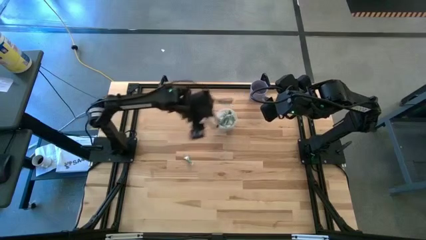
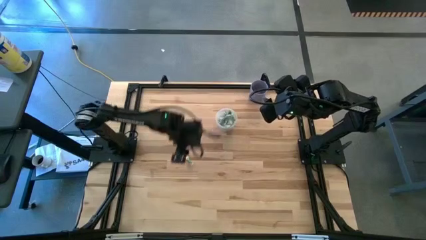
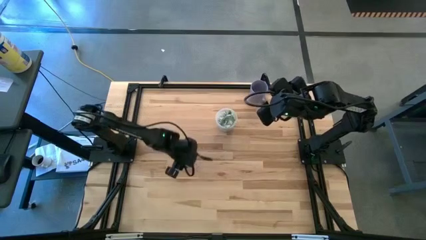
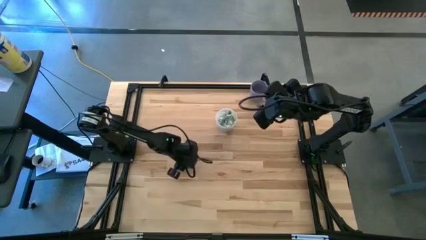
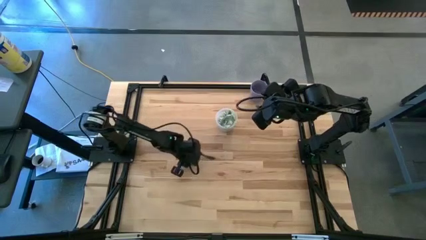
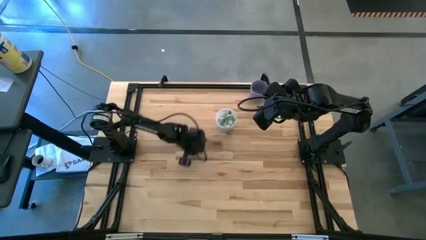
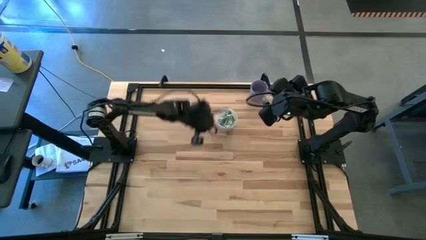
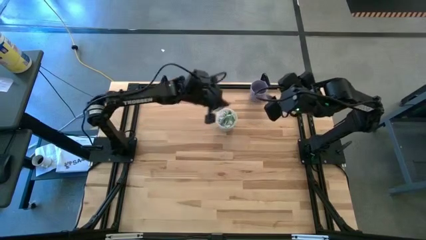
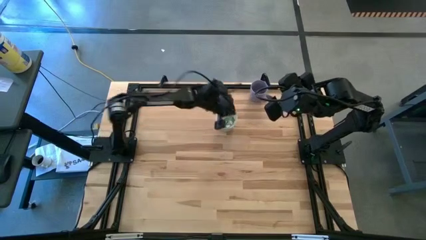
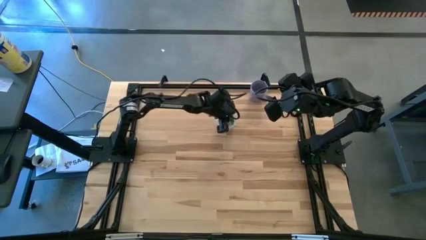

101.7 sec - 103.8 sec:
Task: Pick and place Stevia / Truvia into bins
Put the stevia packet into the transparent container

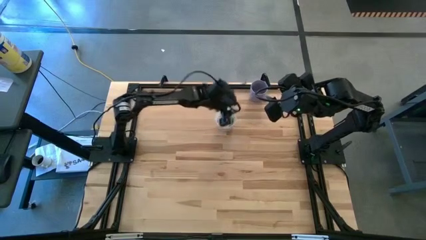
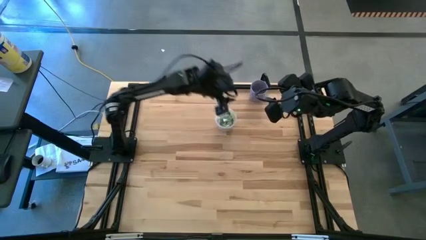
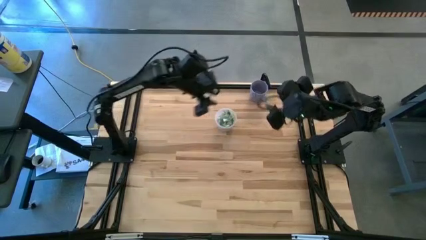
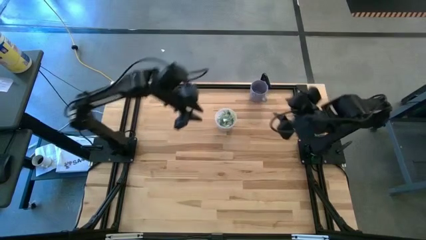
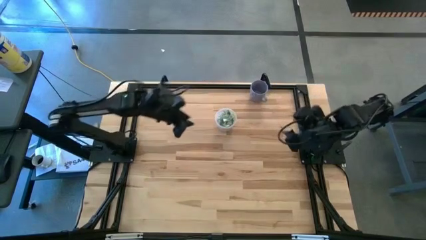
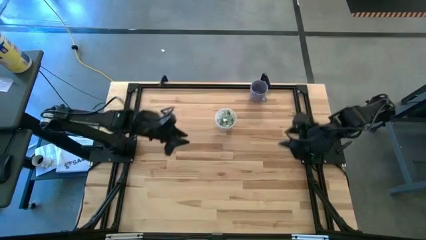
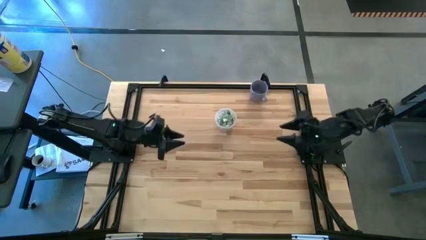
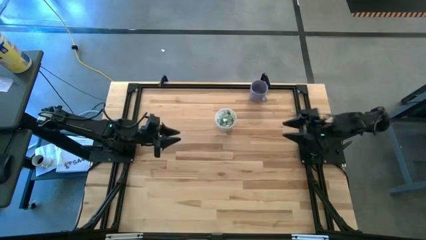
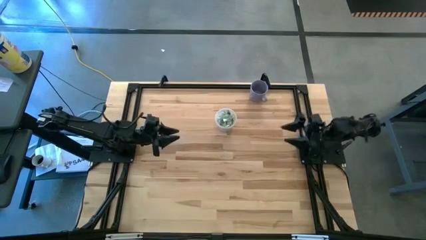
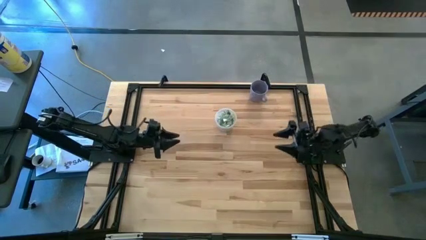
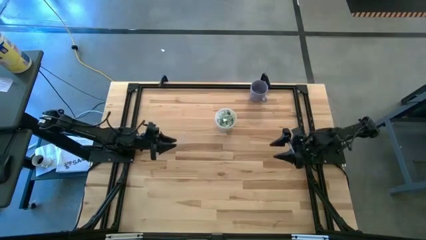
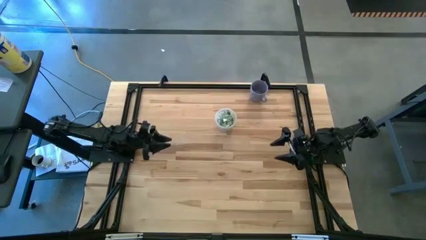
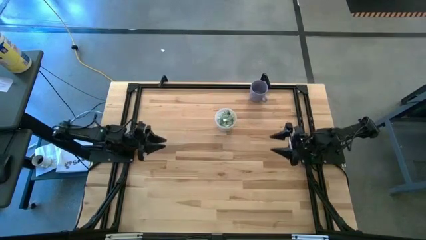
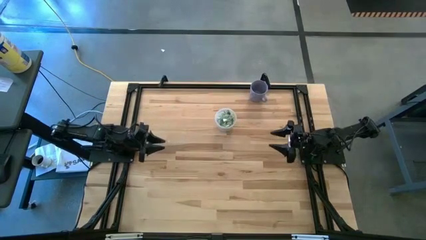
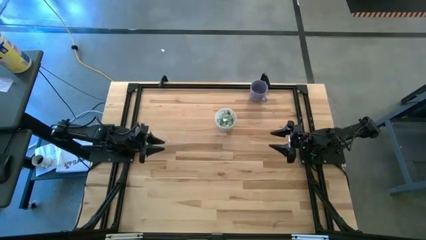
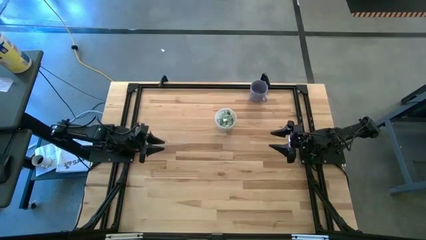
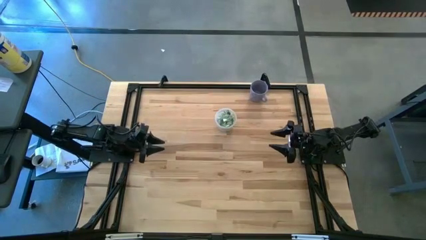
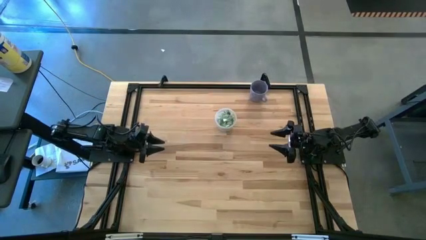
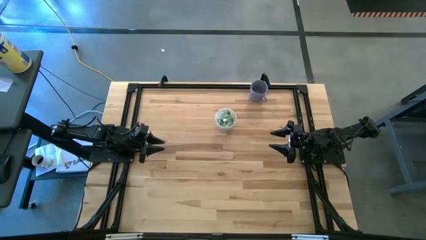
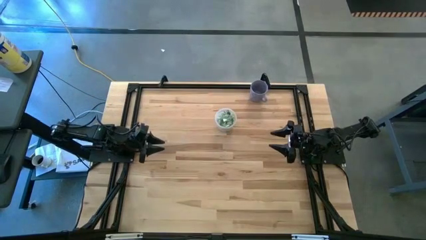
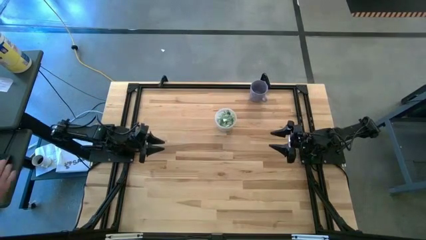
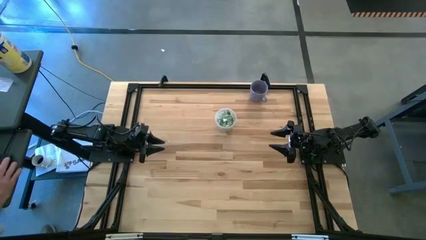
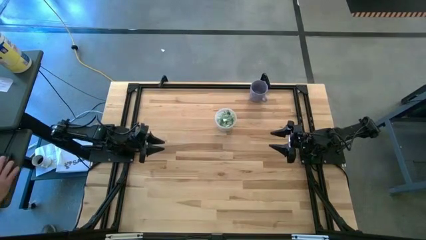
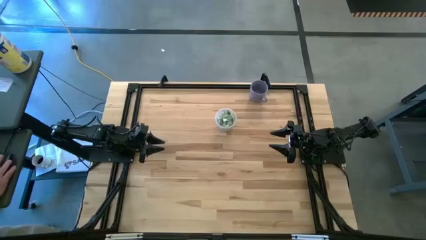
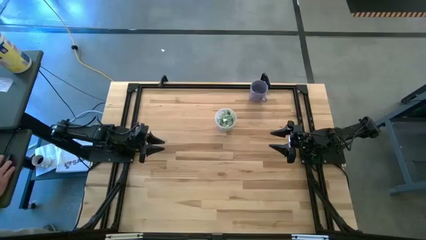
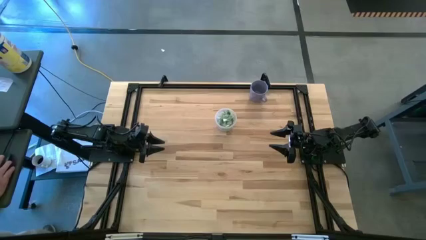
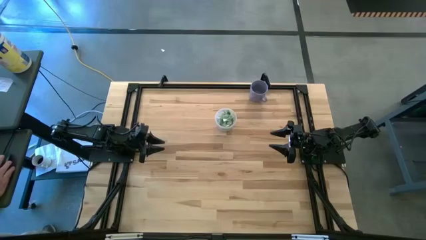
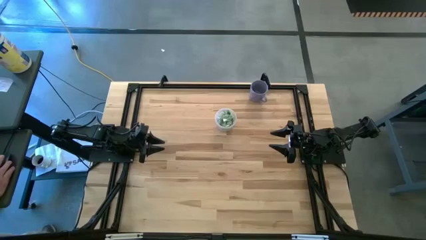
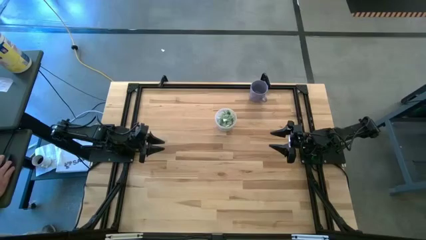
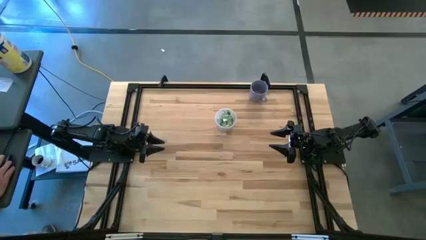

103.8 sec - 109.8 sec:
Return to Home Position

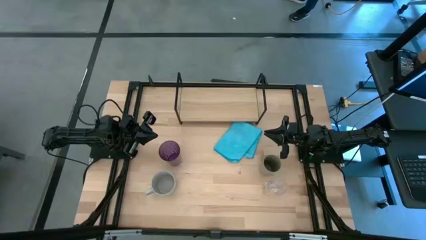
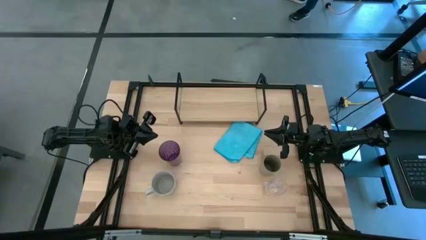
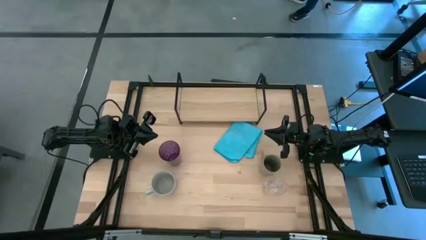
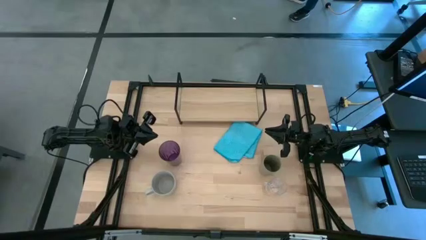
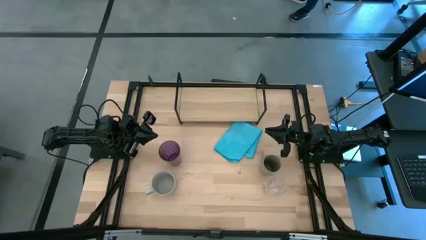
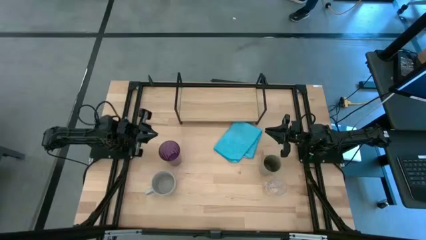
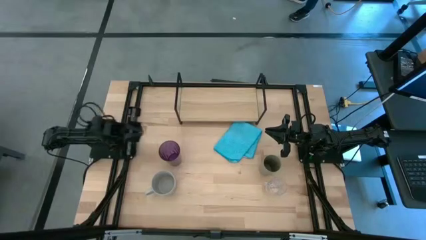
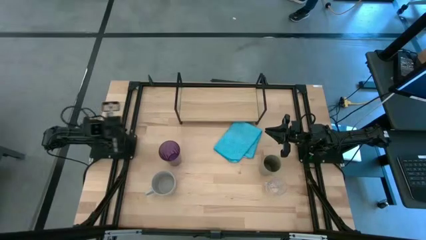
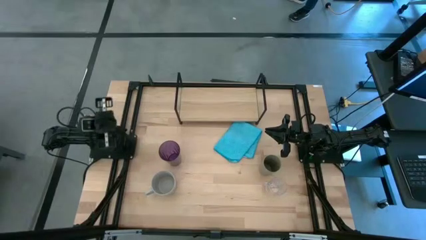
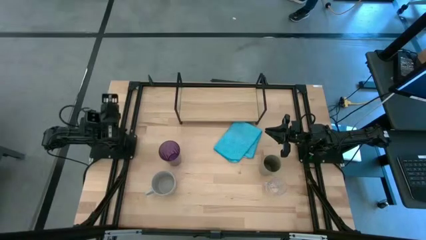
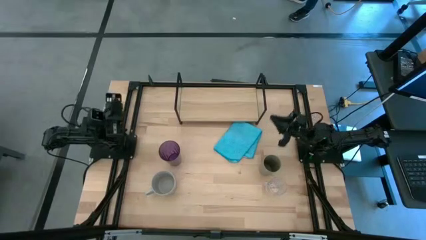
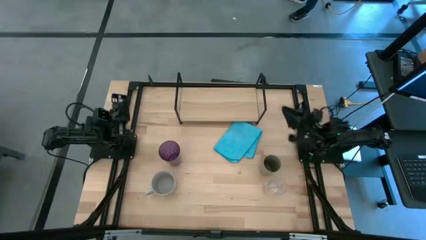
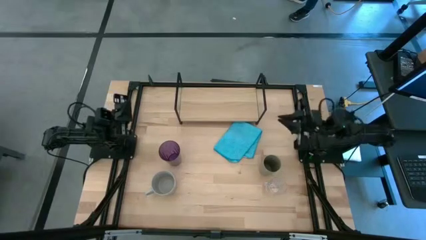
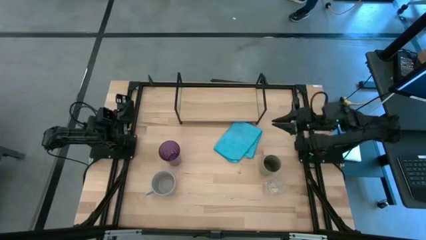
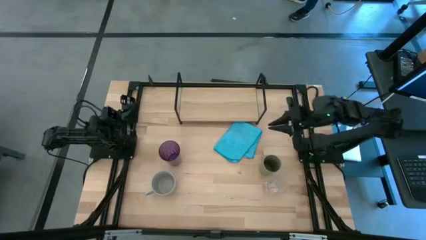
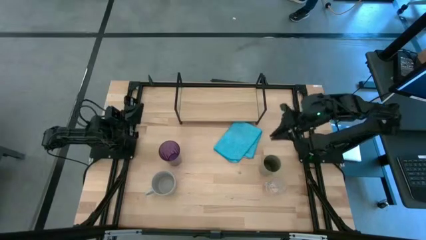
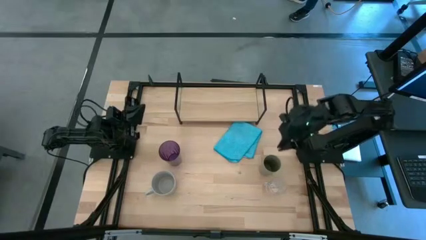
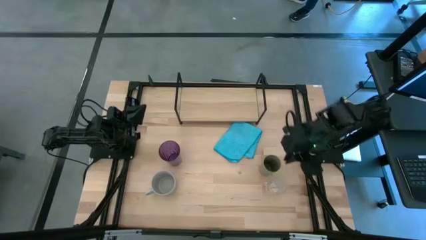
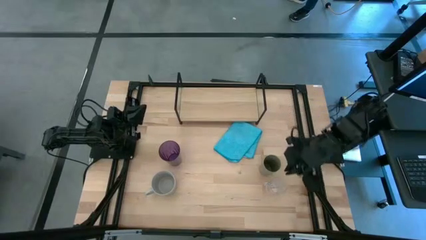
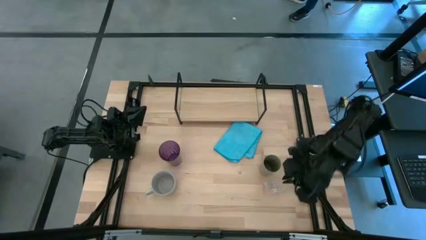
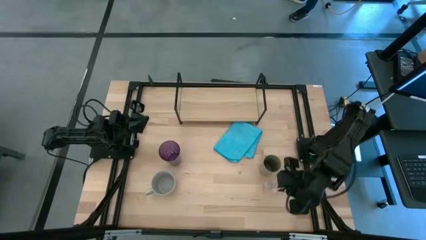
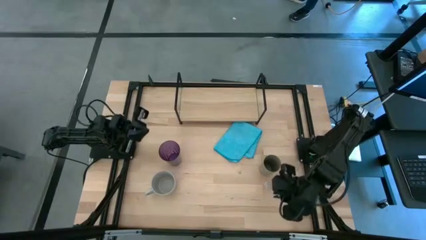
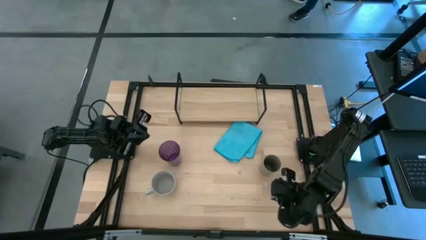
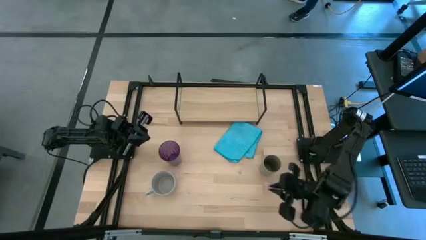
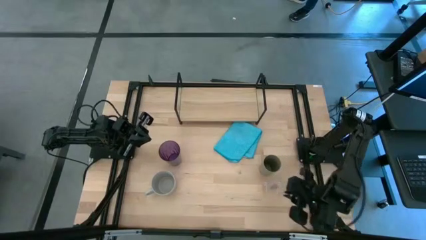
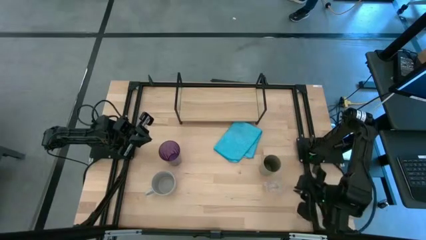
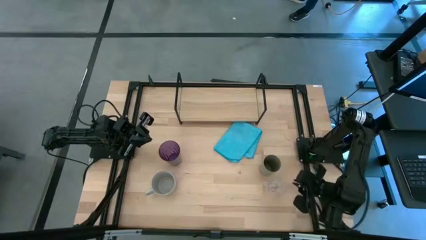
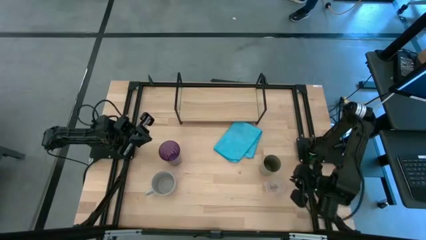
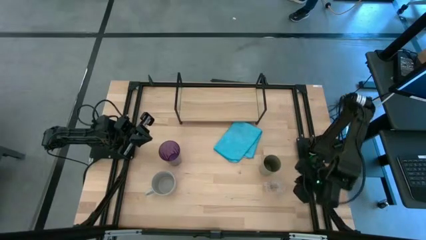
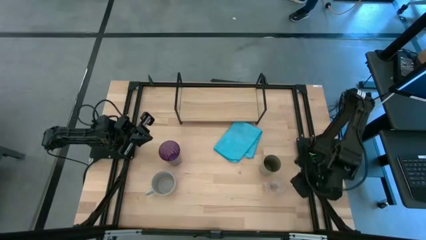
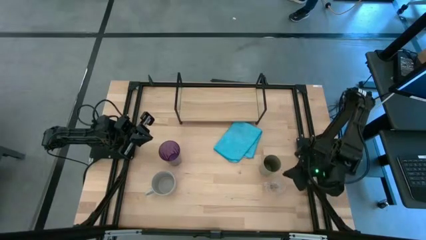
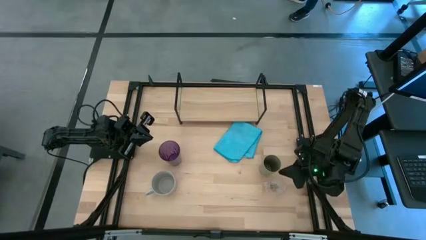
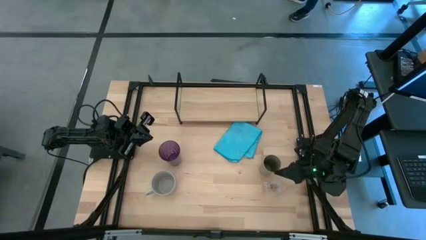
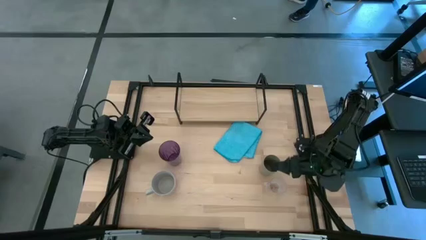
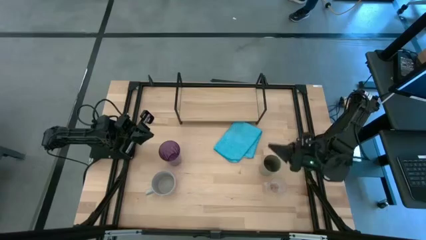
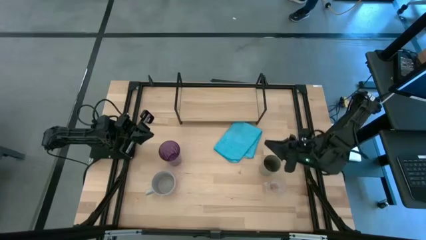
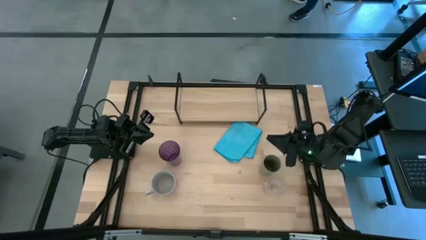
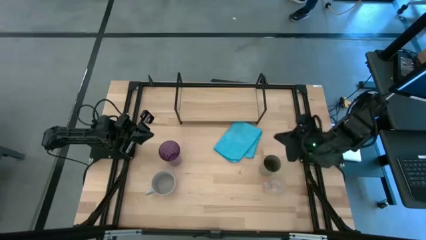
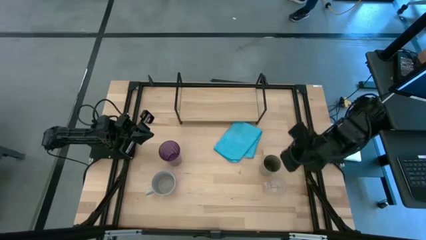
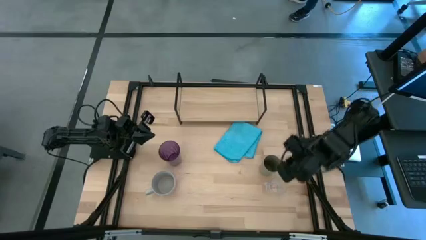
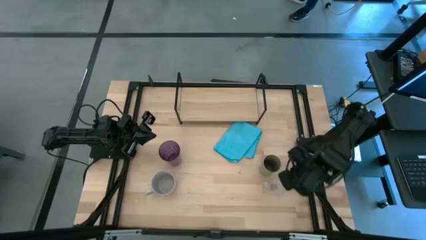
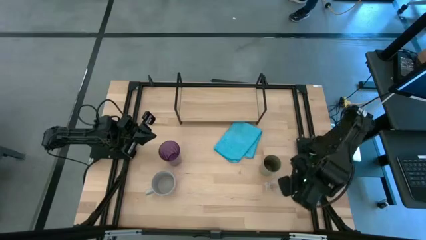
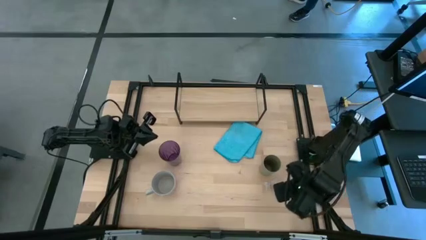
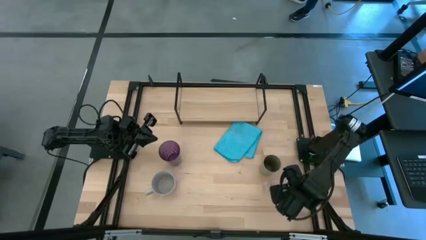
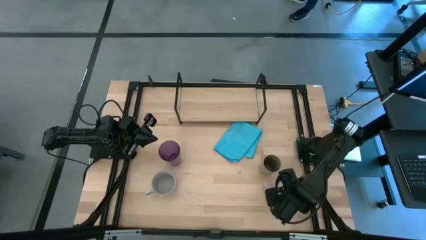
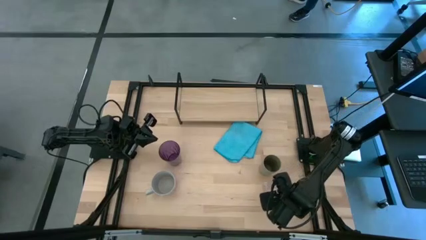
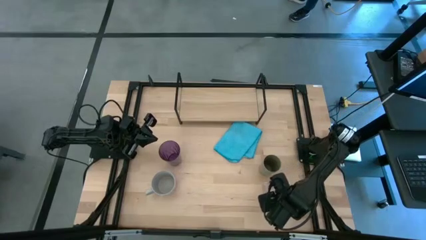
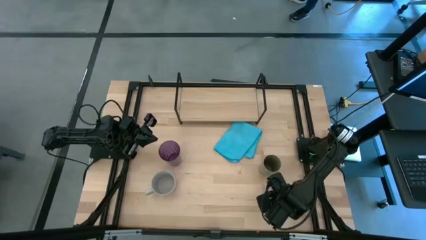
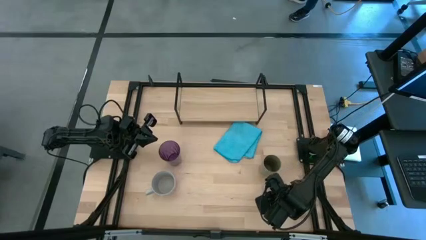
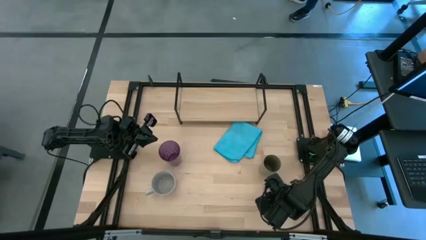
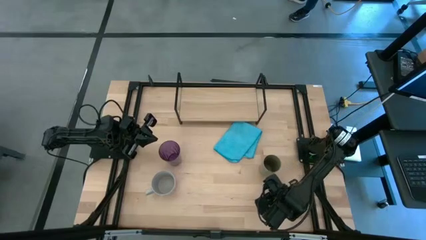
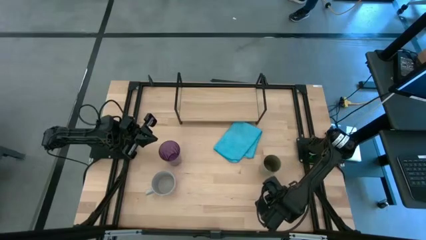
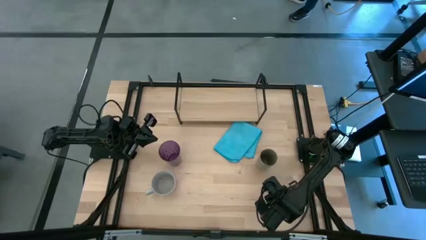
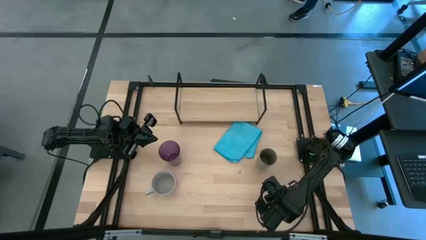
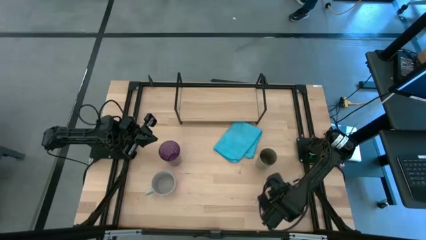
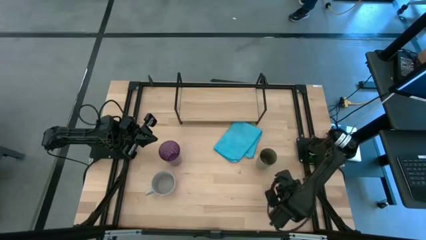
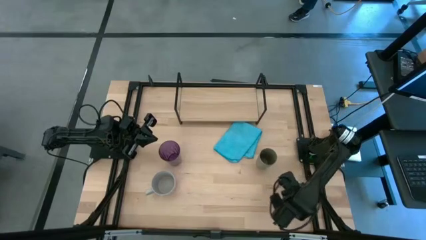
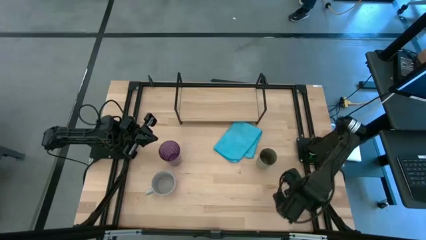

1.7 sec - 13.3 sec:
Task: Stack small to large cups/mugs on shelf
Put the transparent mug on the shelf
